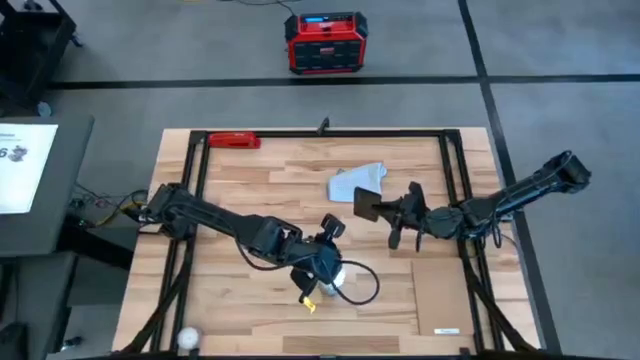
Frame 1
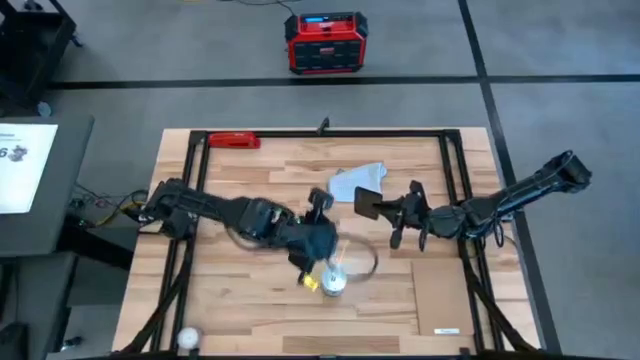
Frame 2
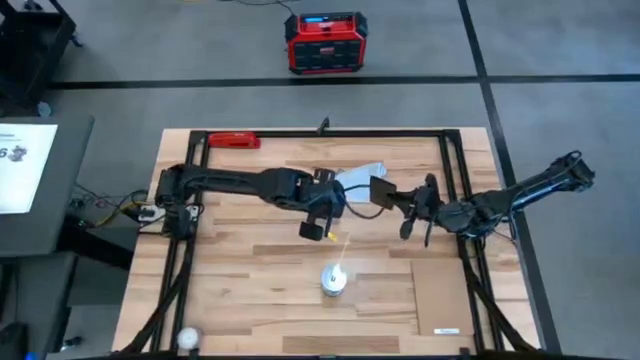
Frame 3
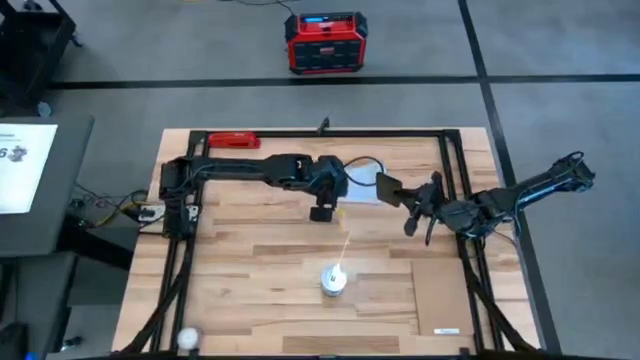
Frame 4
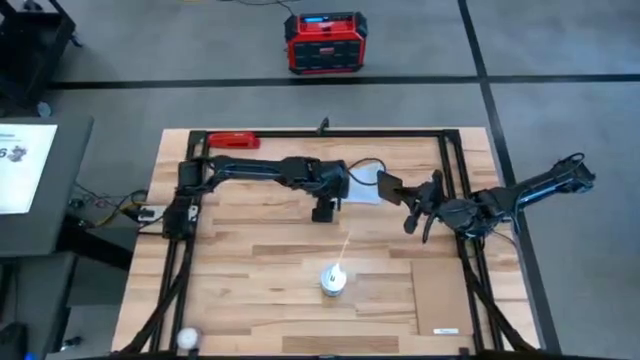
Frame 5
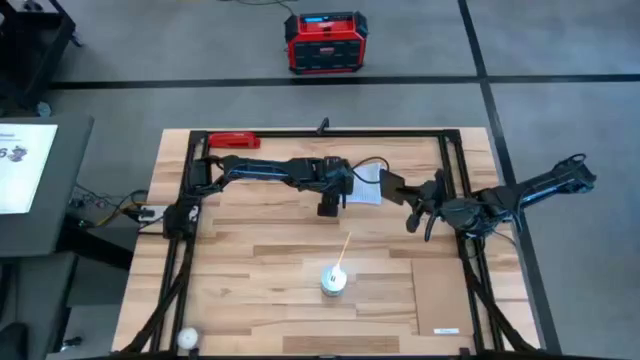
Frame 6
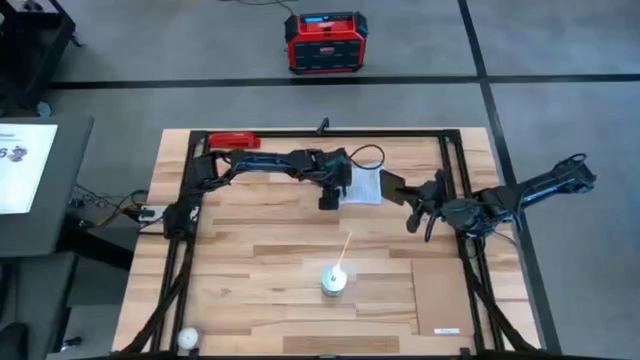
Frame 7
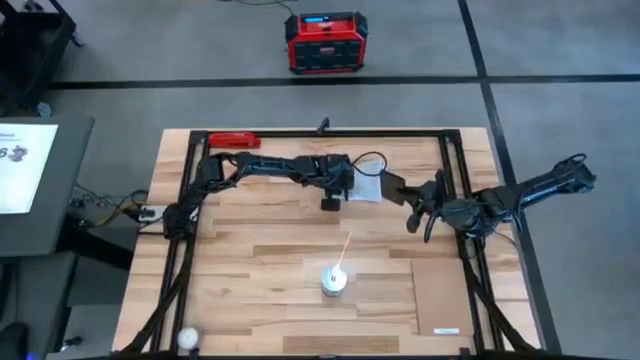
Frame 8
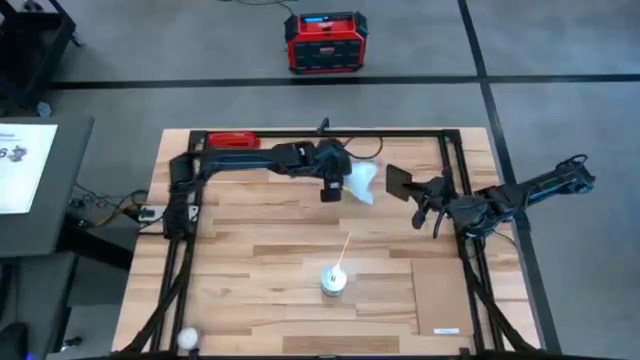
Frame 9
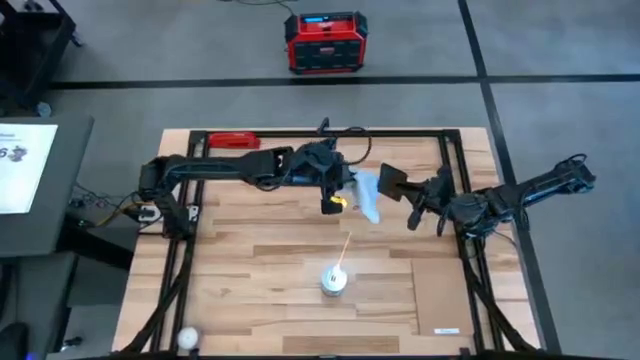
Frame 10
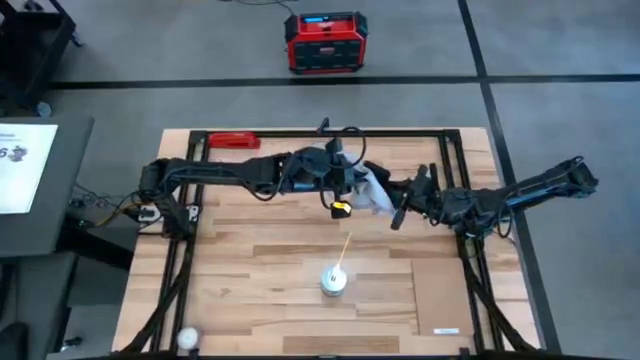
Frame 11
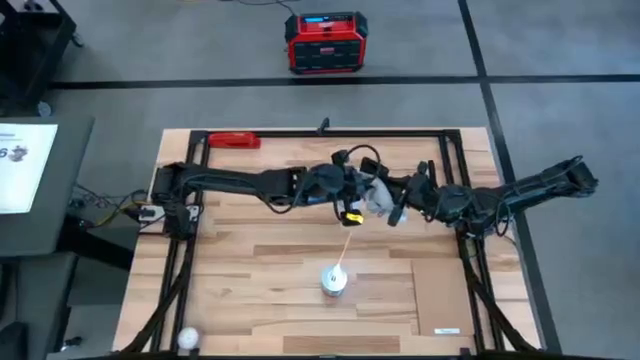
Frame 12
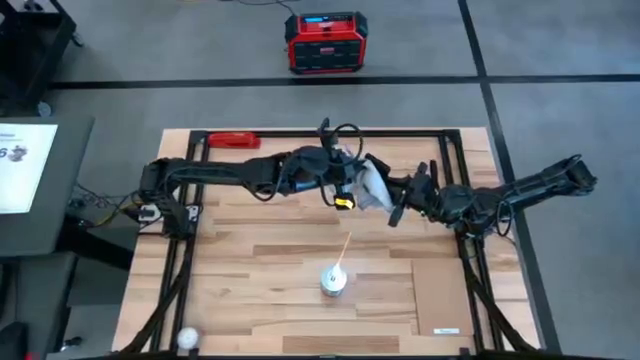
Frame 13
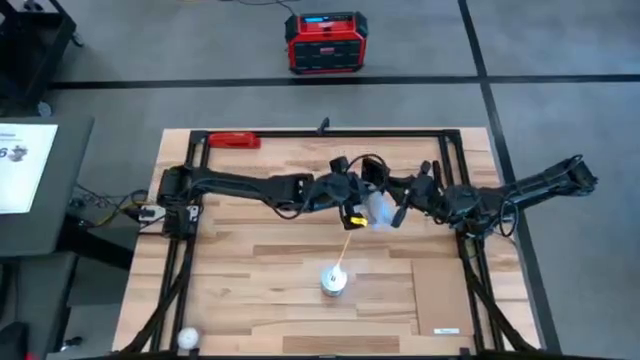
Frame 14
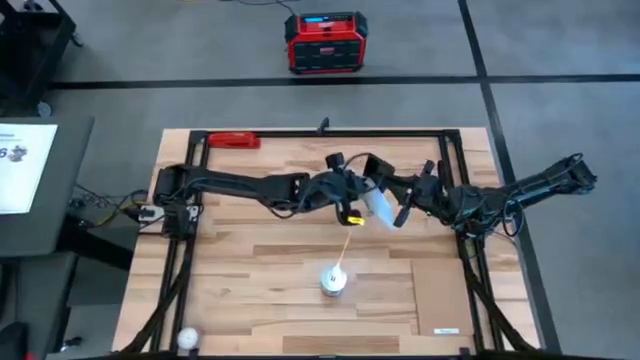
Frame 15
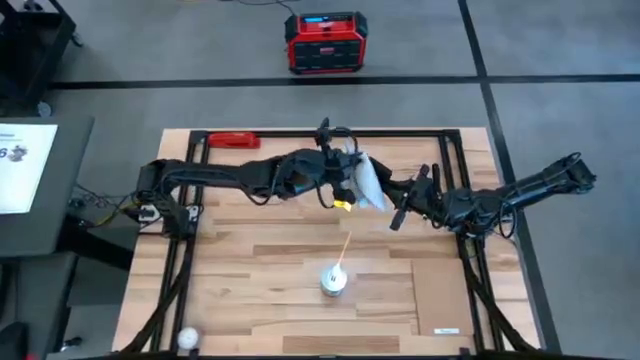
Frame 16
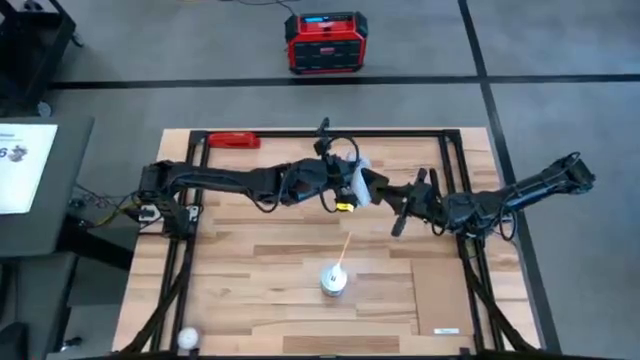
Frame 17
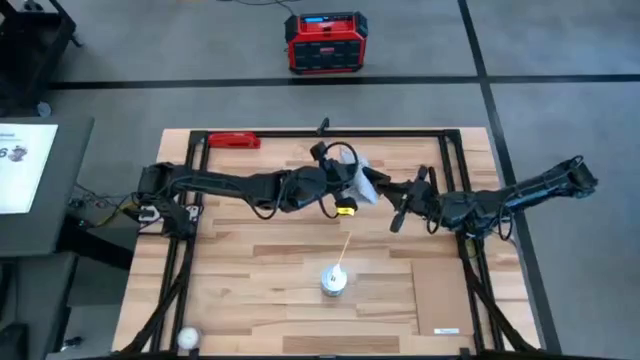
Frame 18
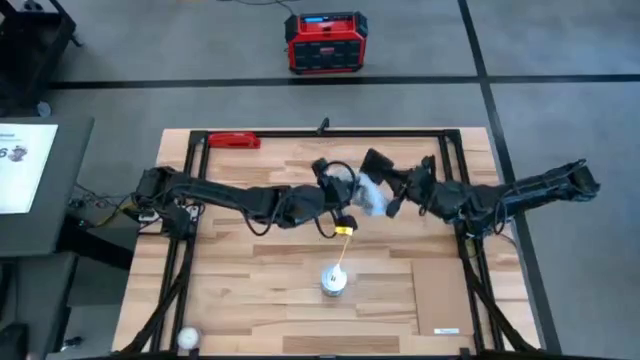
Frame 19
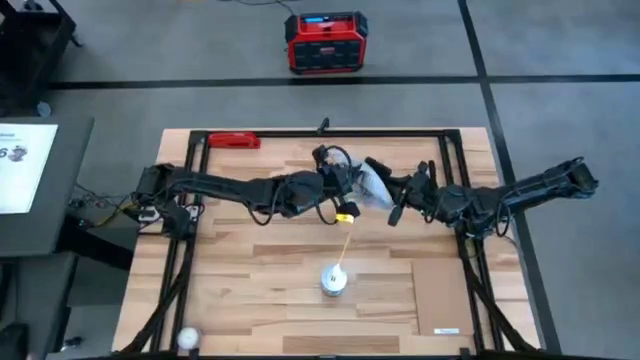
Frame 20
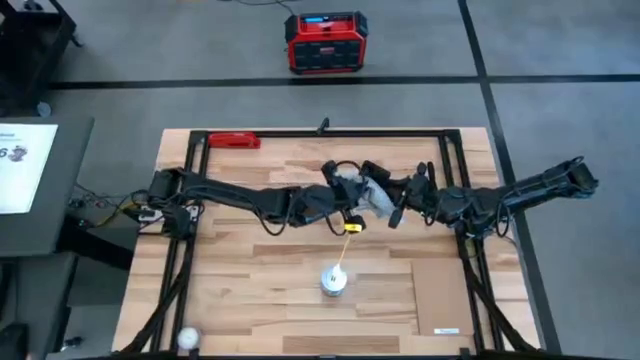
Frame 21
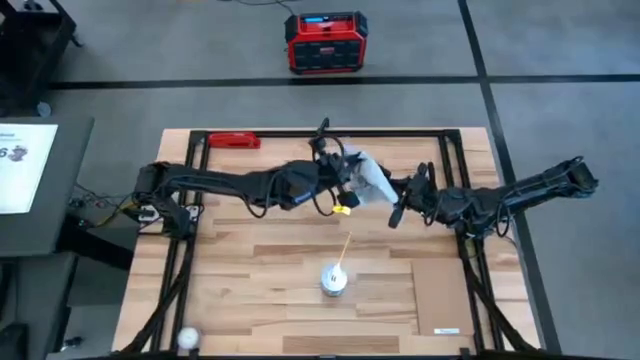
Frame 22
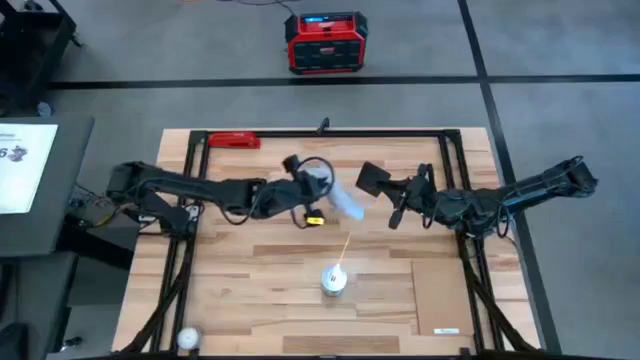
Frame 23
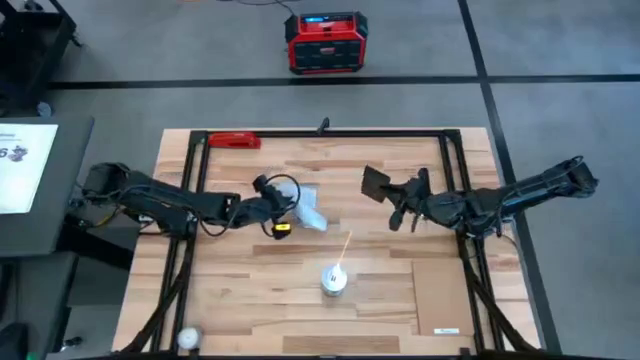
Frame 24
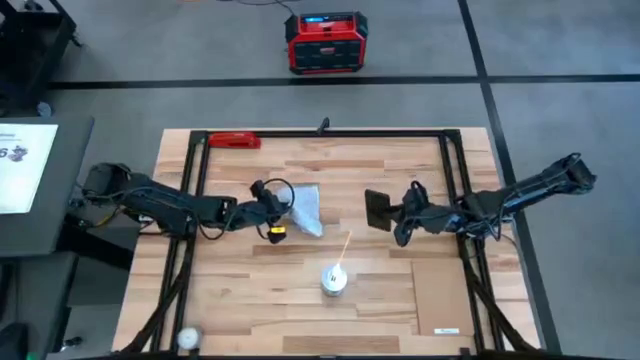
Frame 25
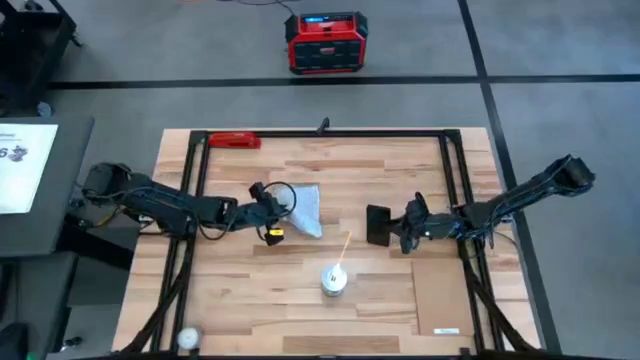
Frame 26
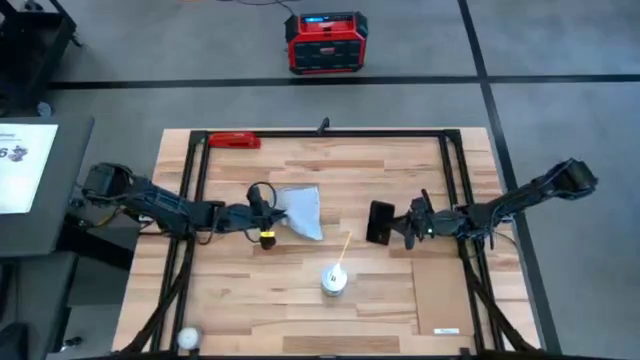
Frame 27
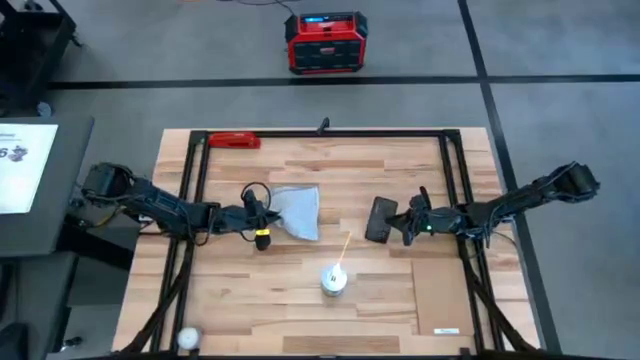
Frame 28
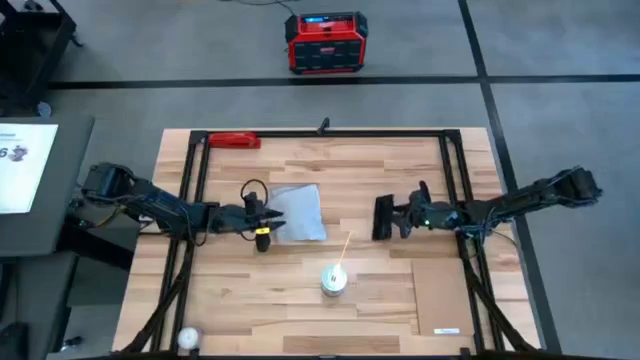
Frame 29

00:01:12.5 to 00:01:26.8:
Task: Apply microfiber cloth
Wipe the back of the black phone with the white microfiber cloth

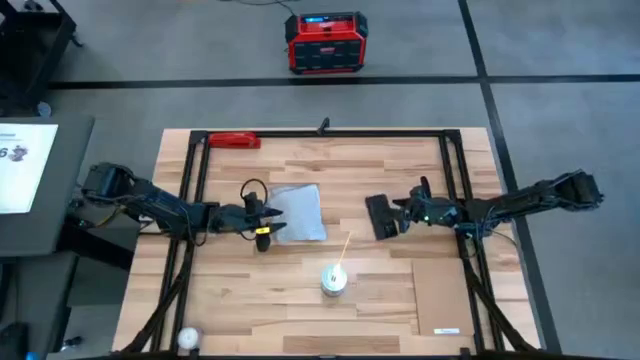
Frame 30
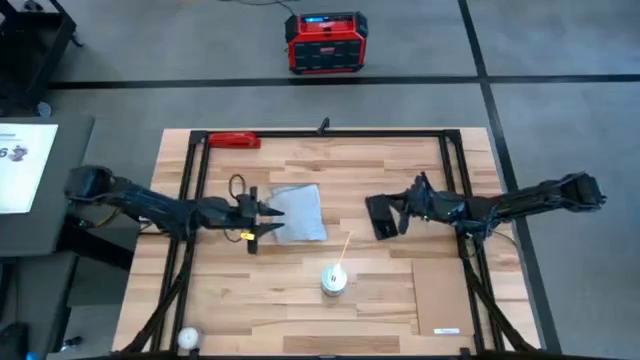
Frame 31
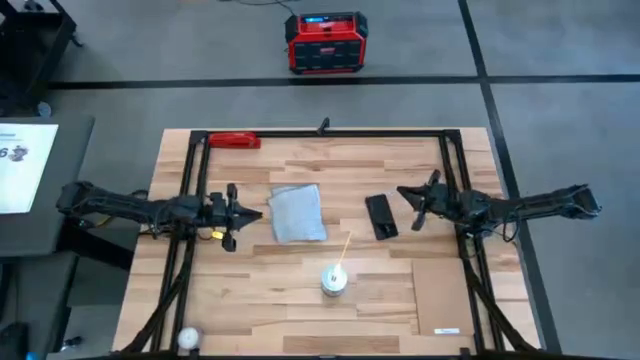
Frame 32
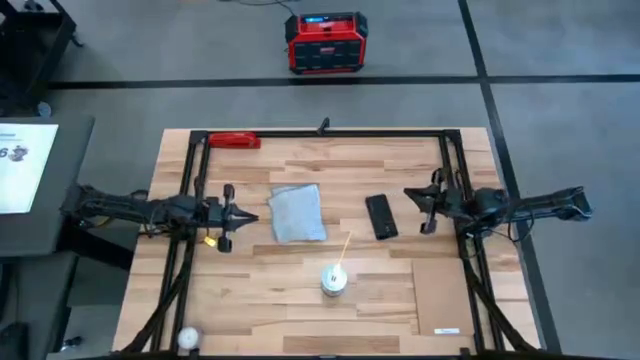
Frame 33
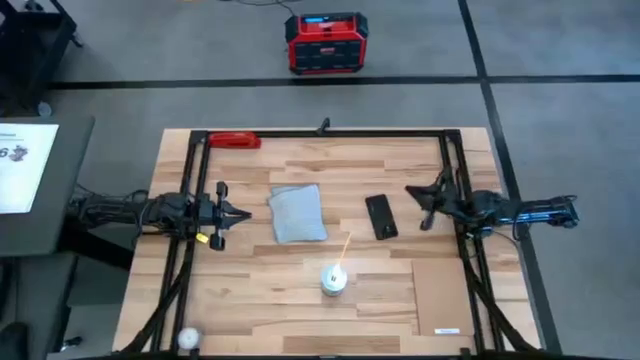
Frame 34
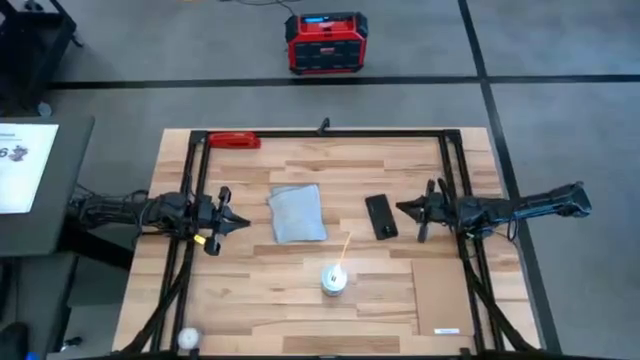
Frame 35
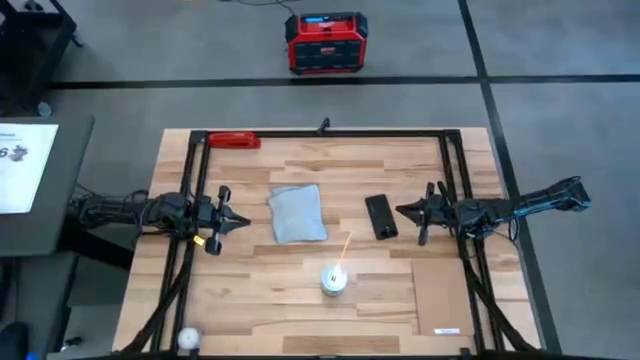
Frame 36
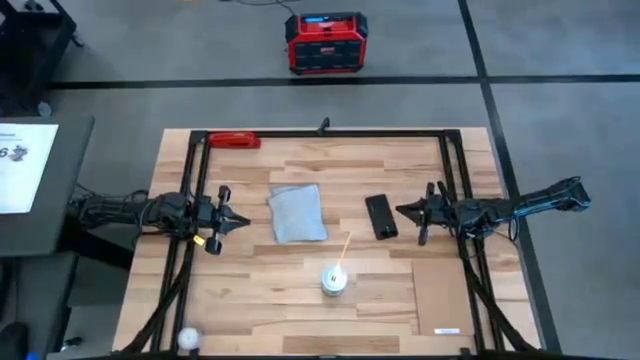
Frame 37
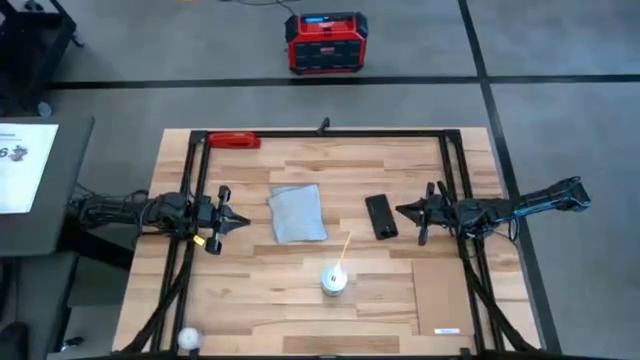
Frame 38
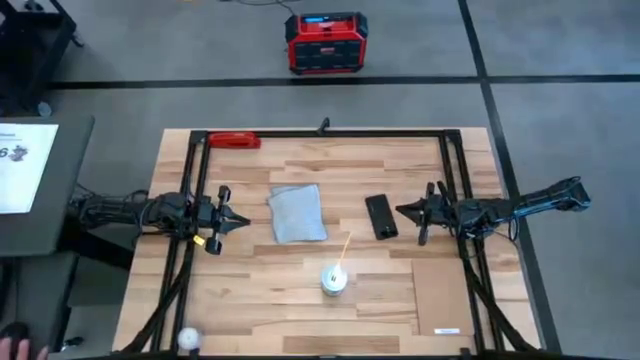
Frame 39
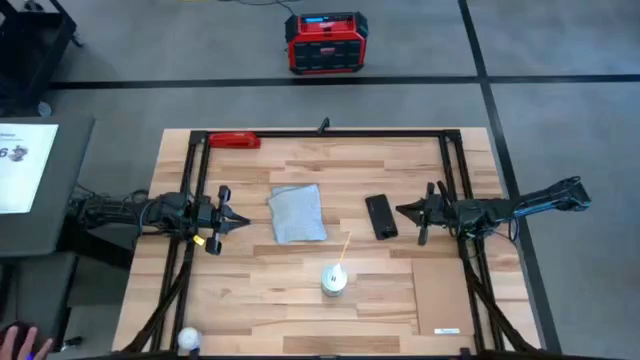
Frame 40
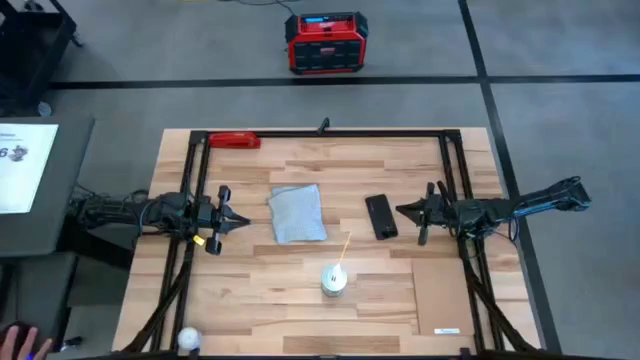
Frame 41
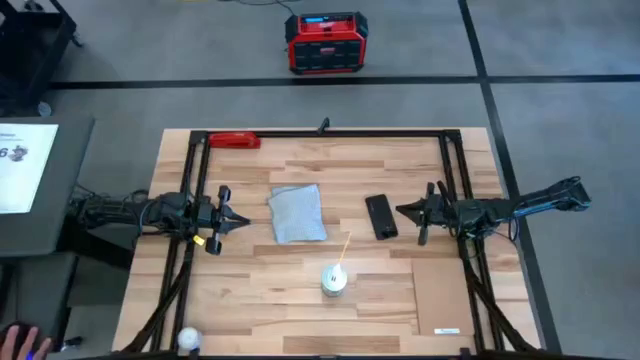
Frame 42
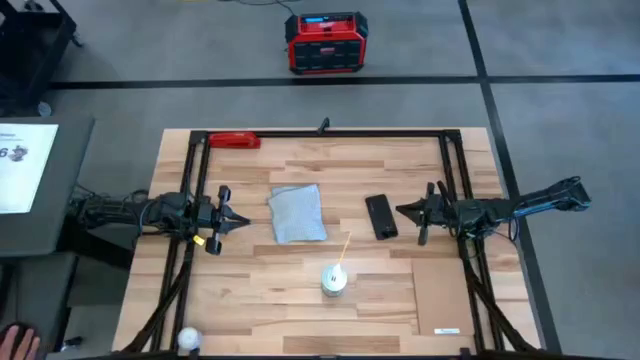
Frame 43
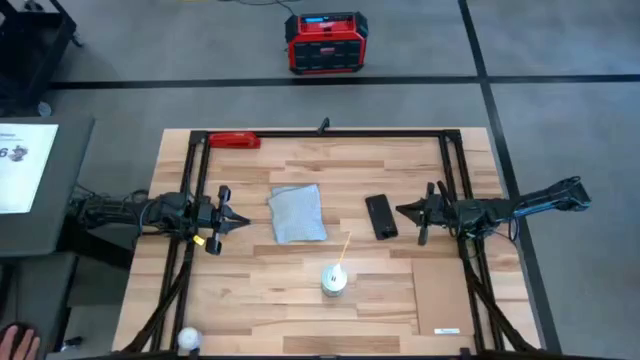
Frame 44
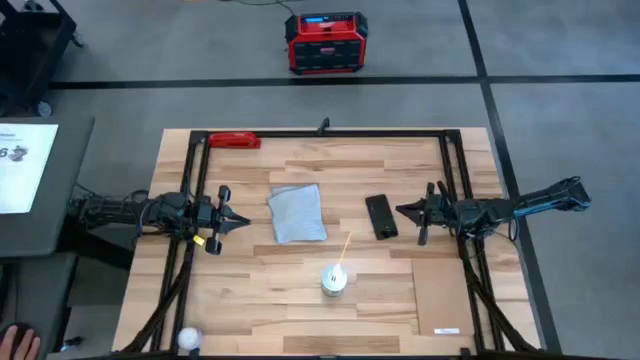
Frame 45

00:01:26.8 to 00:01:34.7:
Return to Home Position
